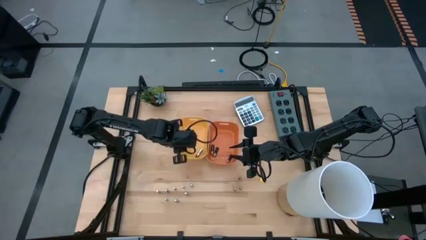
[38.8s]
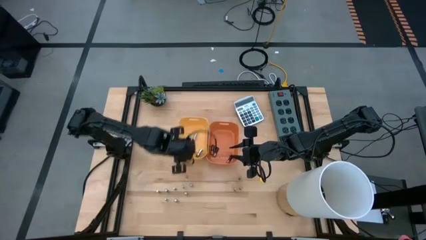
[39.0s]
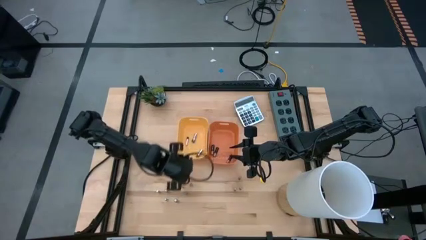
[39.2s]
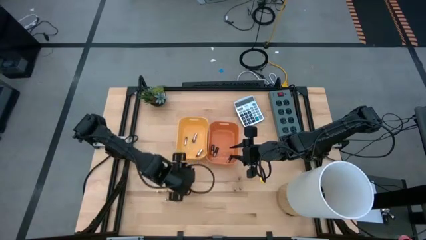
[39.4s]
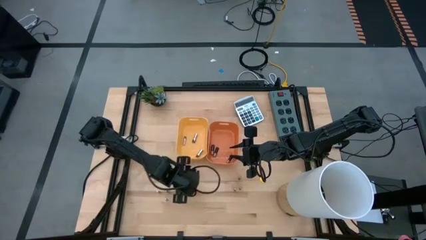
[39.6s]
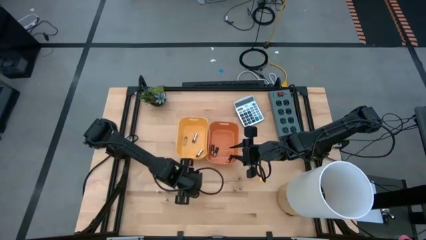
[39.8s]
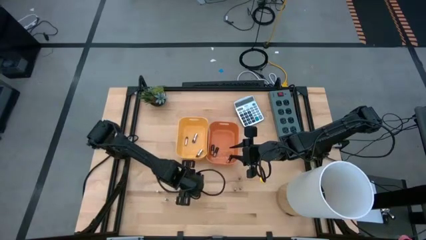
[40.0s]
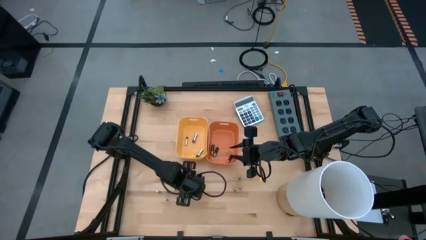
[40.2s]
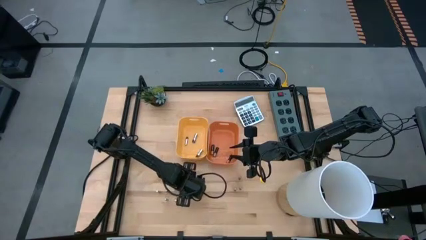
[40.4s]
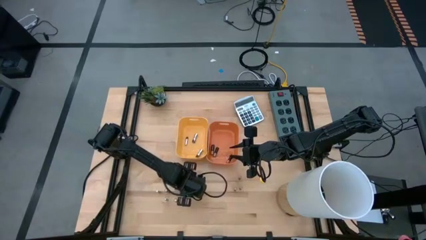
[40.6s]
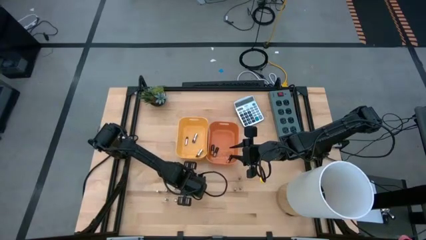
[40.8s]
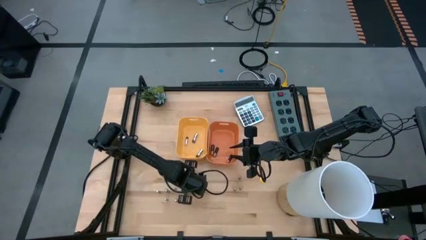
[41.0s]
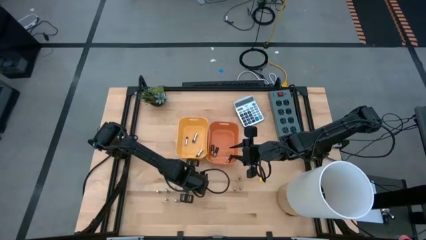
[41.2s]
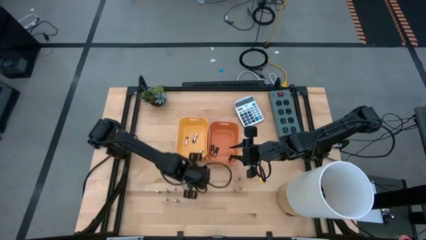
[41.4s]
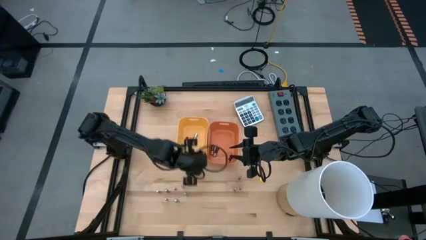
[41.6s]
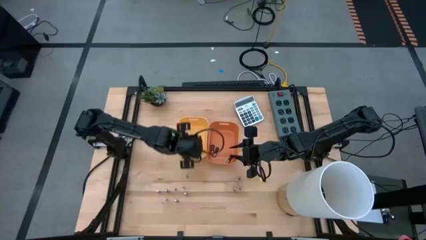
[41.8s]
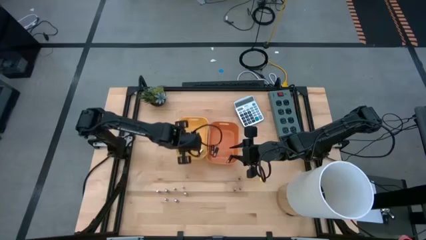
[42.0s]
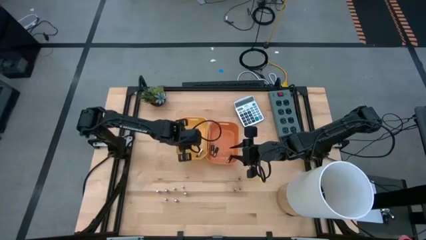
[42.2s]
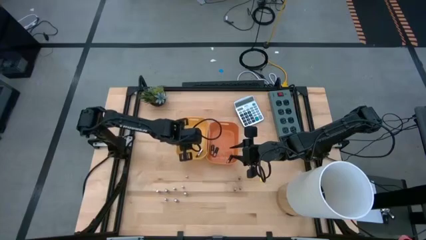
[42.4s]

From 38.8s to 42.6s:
Task: Sort batteries
Put the silver battery into the yellow bin

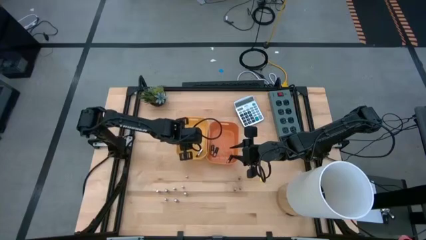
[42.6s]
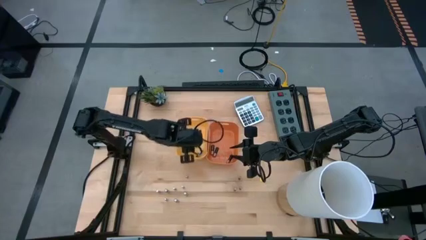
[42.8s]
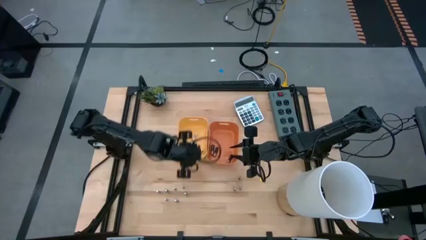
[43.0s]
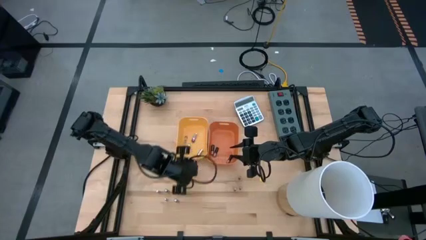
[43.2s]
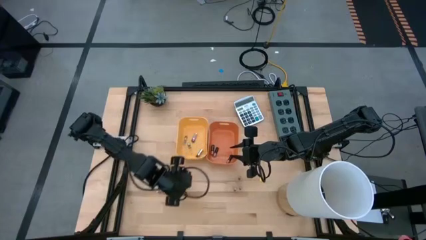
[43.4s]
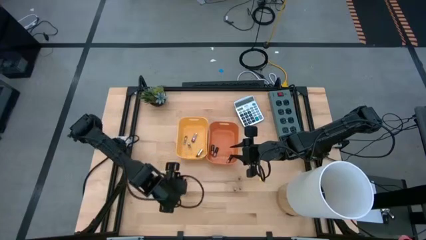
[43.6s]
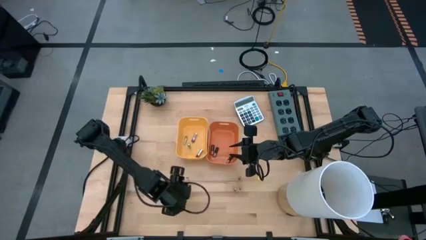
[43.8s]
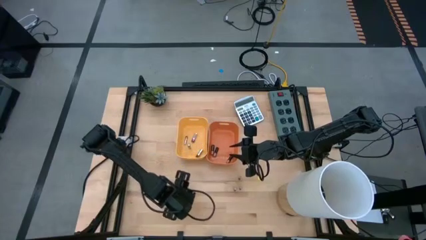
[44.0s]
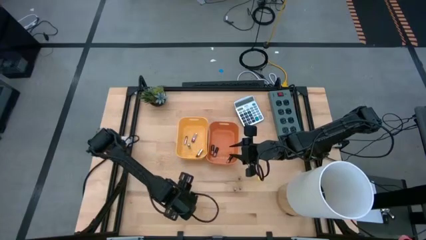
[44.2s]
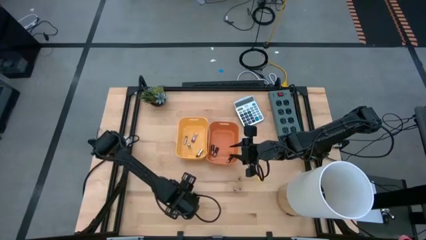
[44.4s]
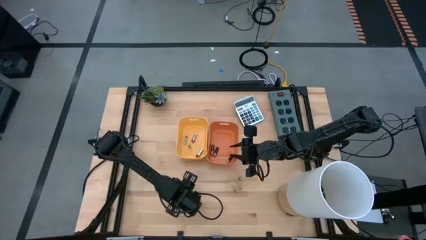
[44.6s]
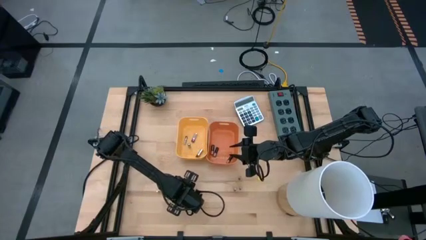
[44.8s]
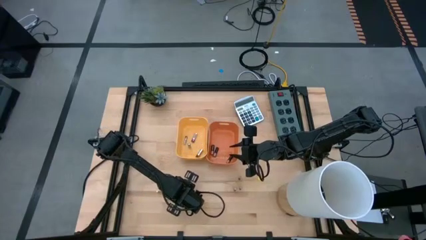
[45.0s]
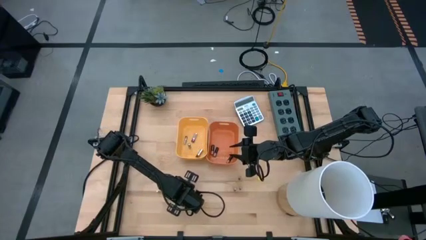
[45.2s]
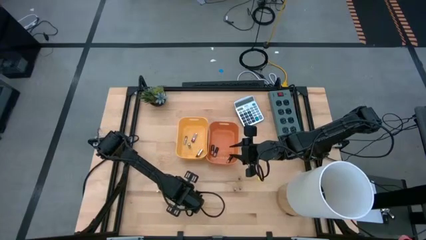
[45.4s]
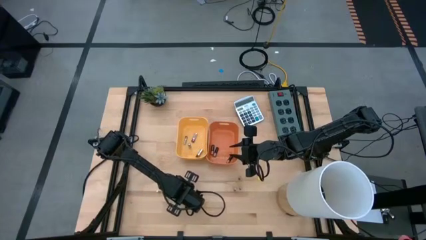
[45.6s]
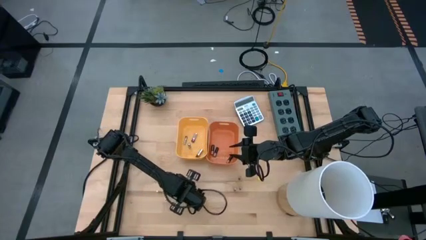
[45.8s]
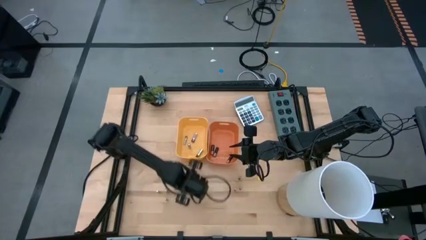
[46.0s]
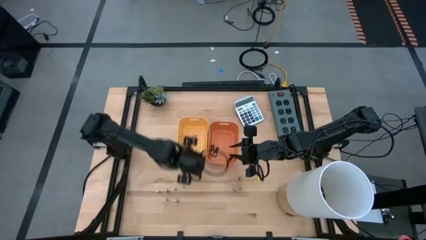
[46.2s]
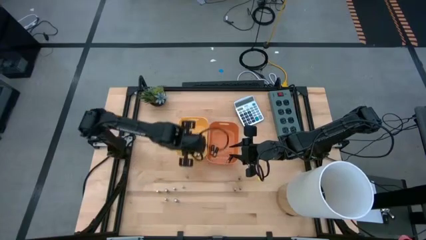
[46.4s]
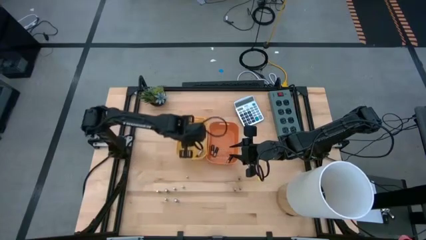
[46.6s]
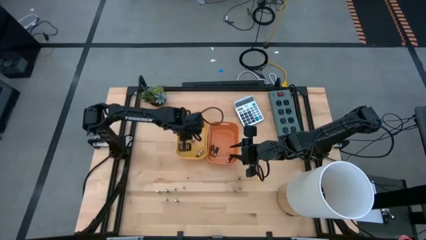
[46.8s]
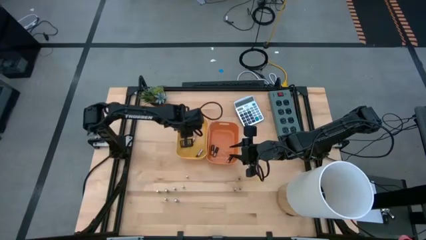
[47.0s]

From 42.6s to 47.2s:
Put the silver battery into the yellow bin

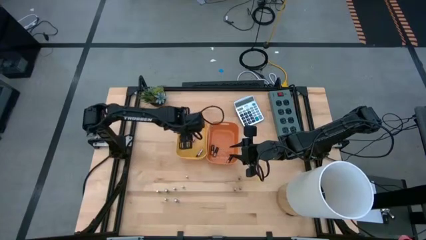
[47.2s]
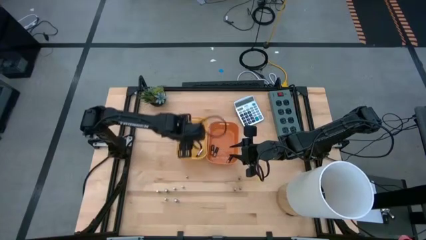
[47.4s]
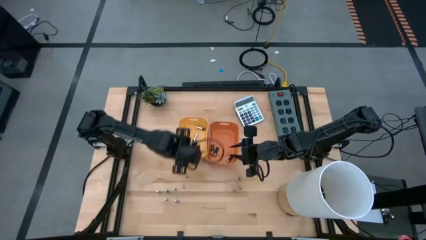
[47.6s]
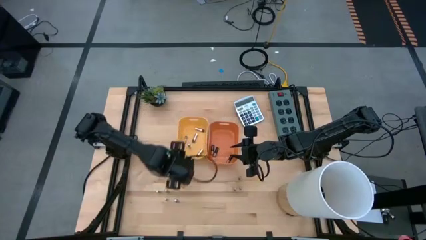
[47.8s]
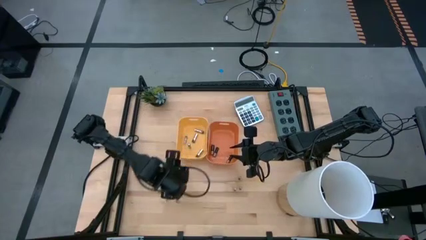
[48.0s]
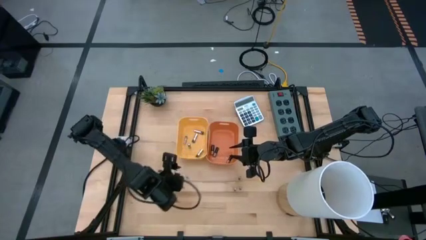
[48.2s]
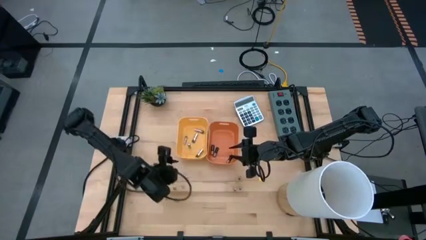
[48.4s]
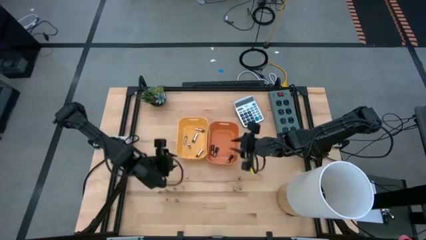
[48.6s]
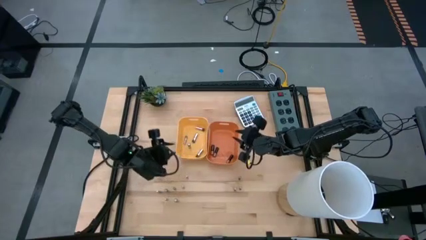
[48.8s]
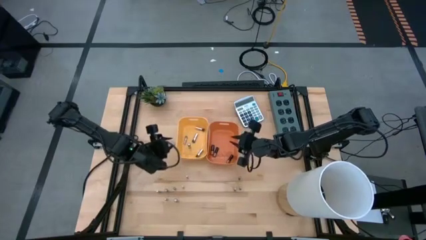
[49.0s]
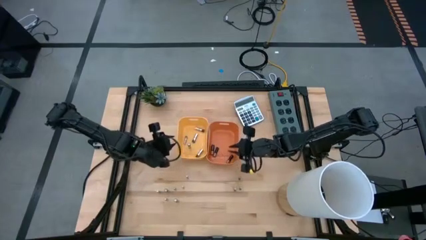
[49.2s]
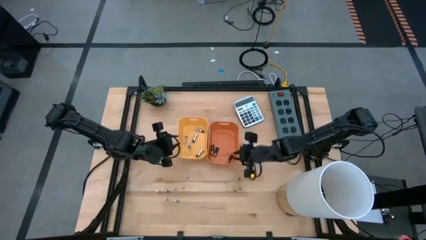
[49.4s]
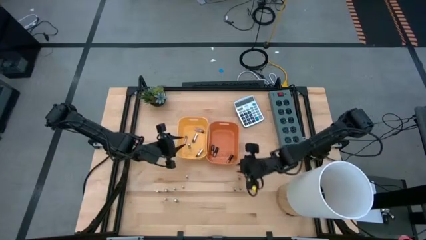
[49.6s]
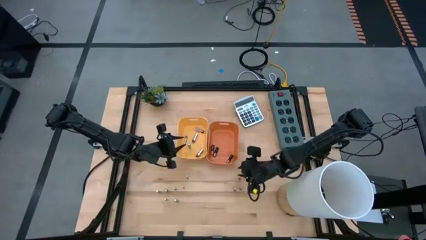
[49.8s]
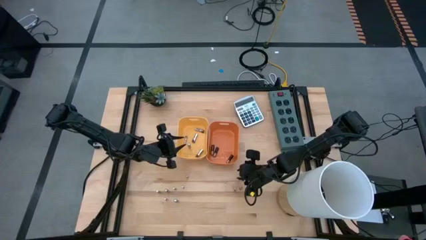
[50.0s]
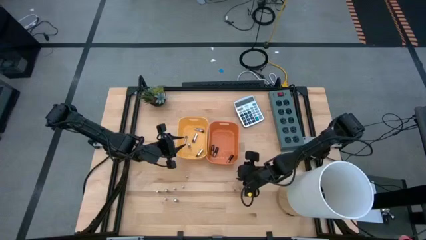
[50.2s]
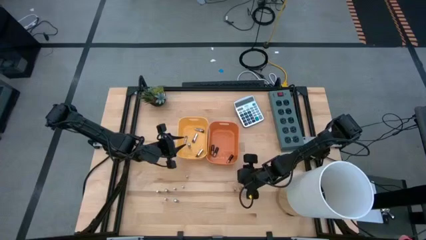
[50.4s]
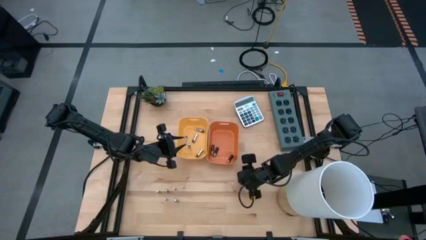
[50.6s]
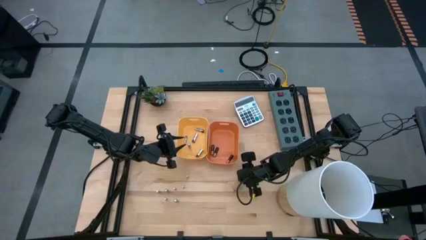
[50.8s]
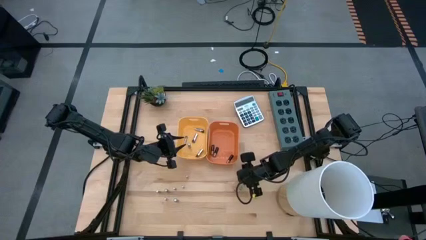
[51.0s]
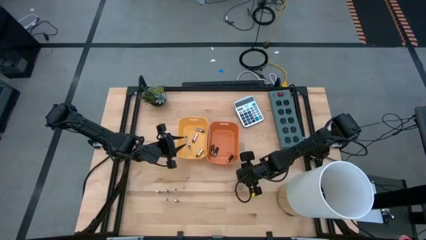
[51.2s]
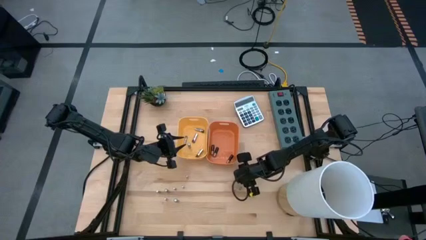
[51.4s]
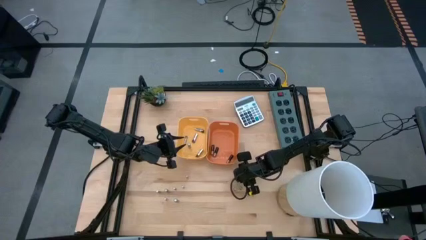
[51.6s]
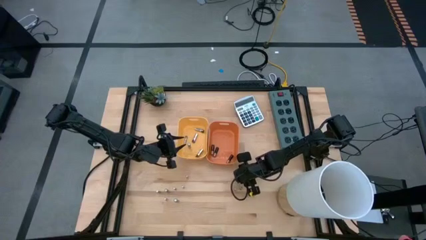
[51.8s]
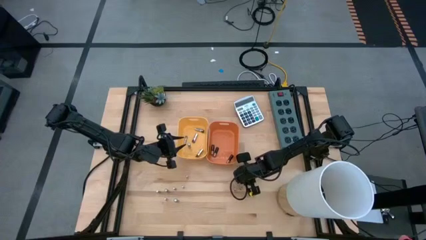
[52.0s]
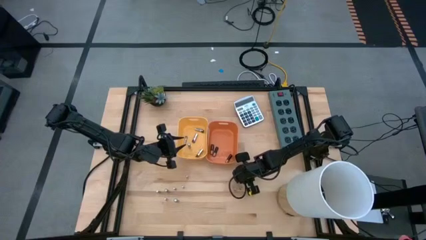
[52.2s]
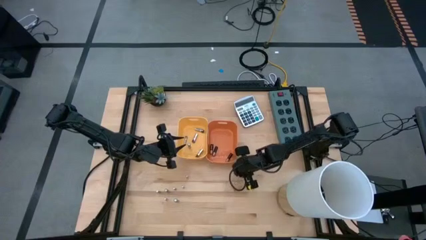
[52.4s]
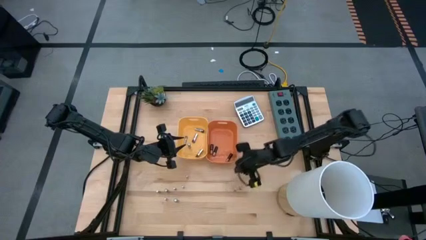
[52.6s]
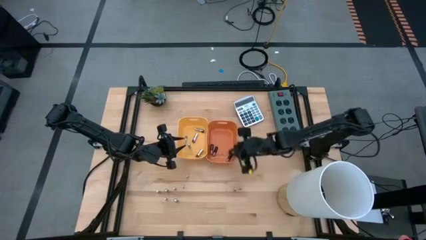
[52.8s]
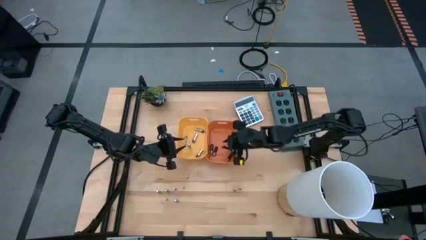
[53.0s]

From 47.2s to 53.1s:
Put the black battery into the orange bin

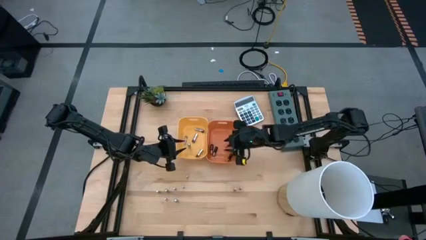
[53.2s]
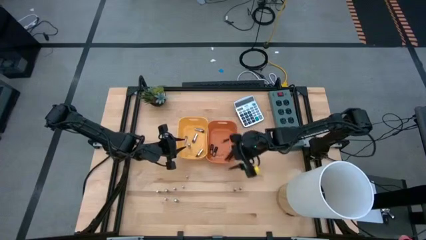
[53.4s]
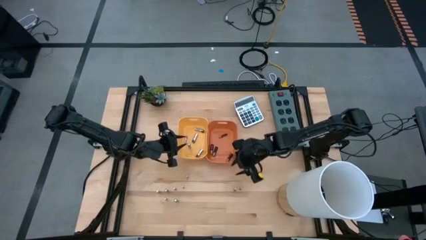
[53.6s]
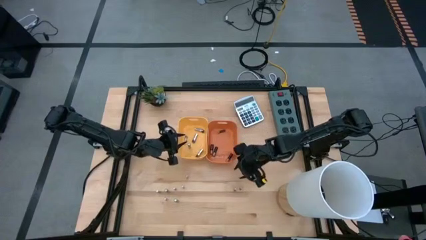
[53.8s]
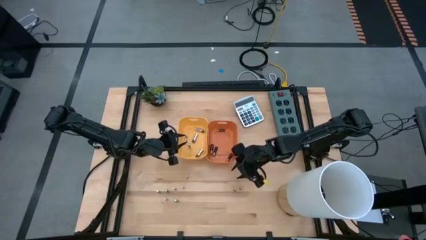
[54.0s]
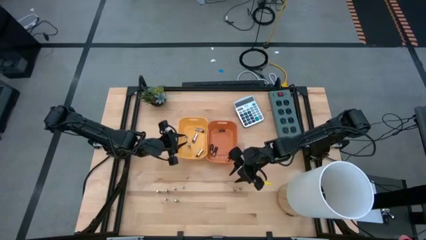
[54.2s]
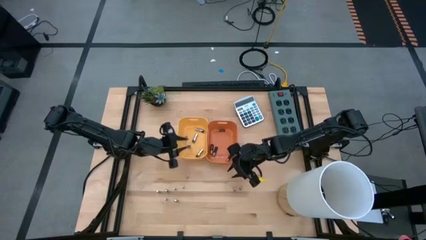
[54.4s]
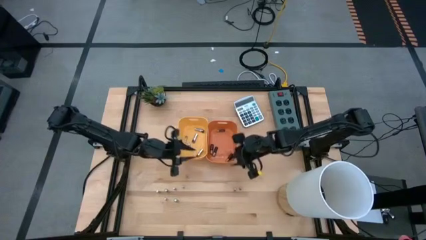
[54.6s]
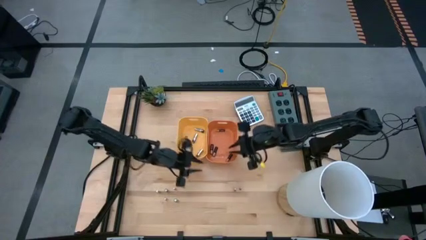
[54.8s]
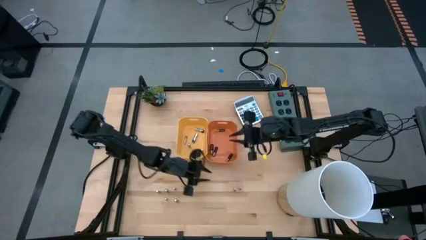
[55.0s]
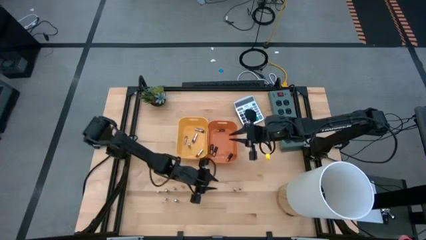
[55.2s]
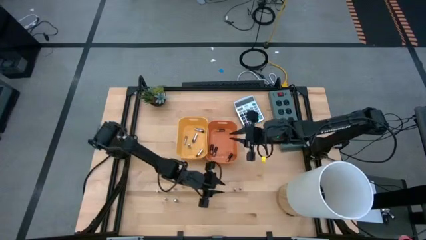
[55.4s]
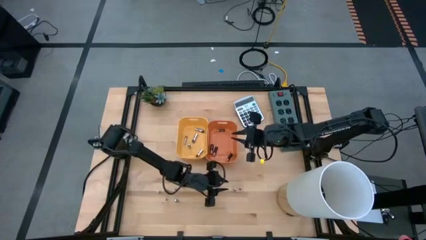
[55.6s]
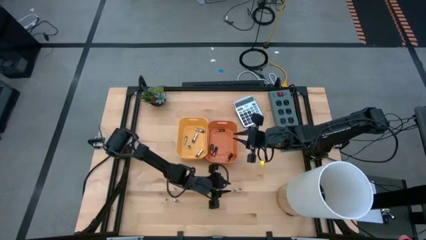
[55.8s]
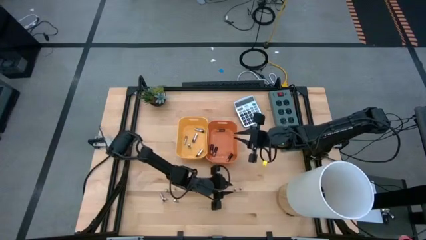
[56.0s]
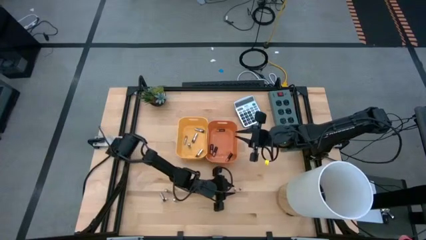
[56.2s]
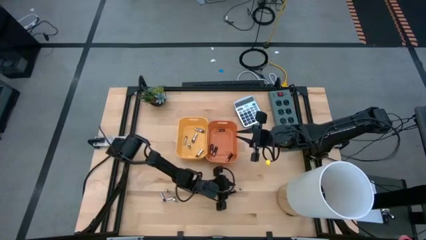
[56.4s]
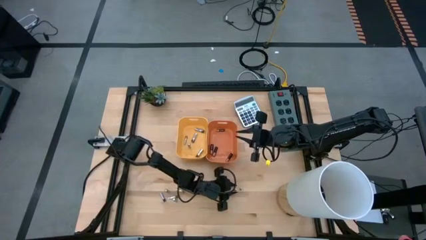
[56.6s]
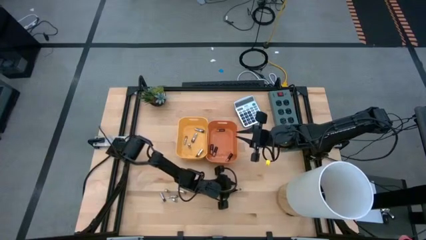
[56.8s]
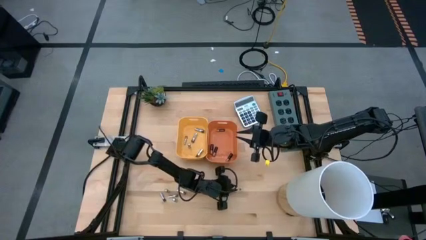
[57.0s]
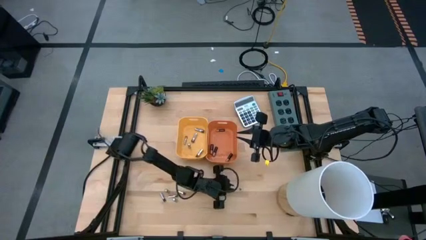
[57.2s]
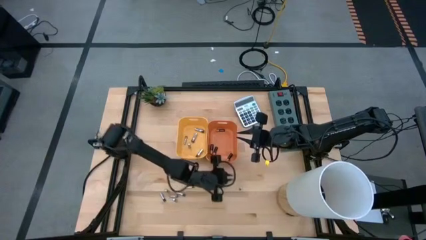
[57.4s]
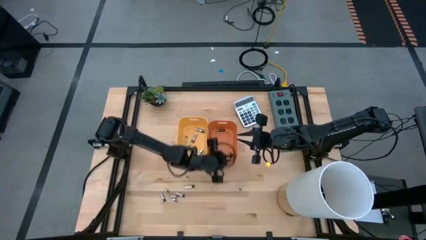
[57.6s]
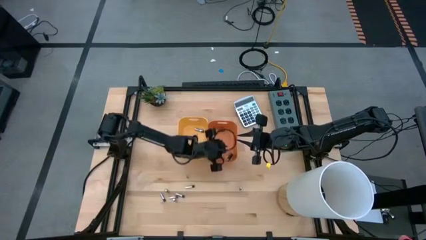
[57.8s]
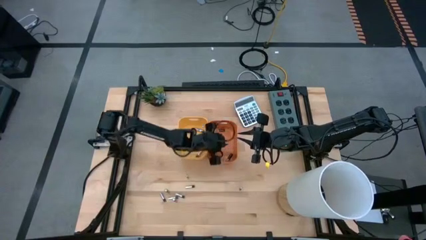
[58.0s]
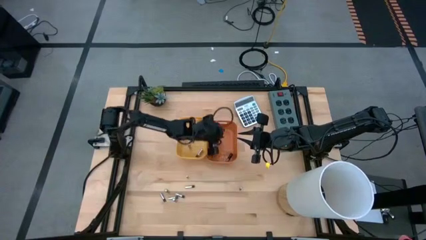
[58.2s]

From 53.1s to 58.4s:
Put the black battery into the orange bin
